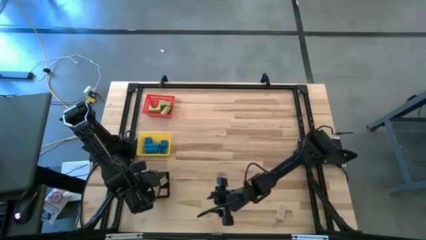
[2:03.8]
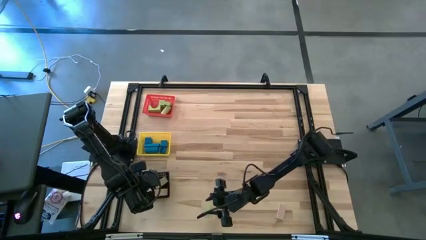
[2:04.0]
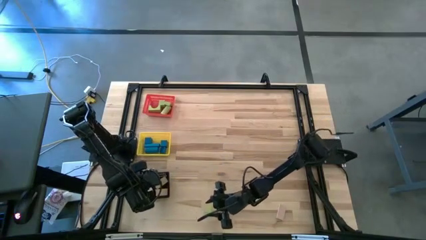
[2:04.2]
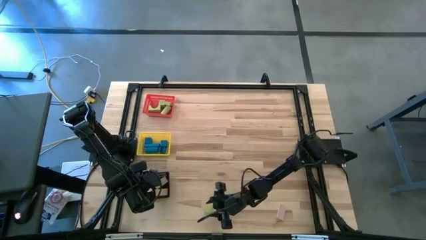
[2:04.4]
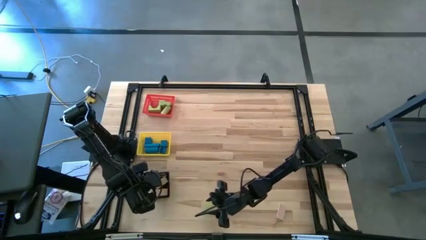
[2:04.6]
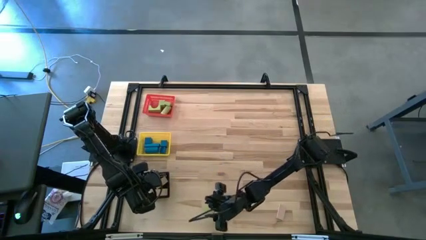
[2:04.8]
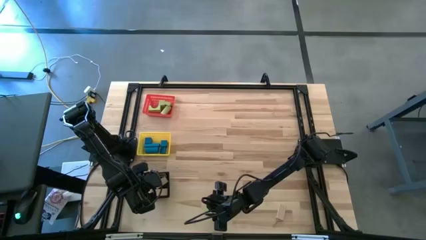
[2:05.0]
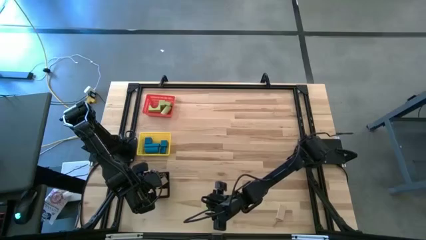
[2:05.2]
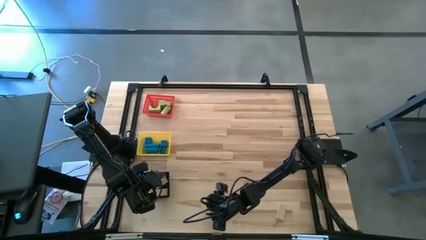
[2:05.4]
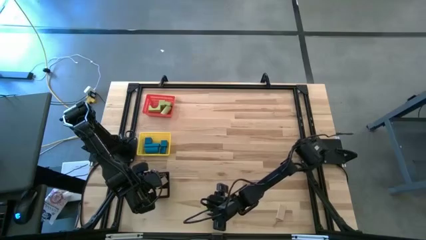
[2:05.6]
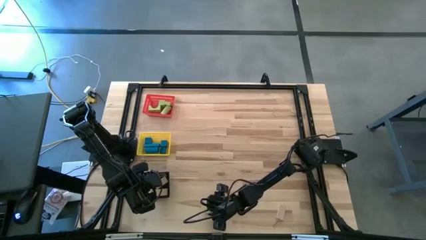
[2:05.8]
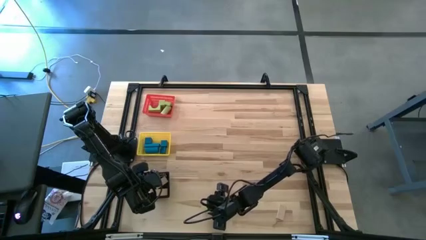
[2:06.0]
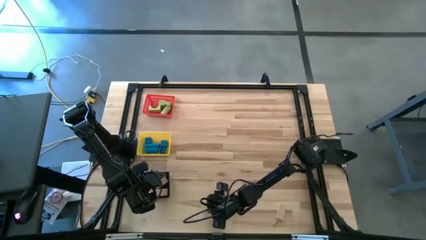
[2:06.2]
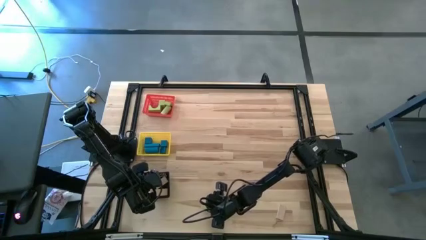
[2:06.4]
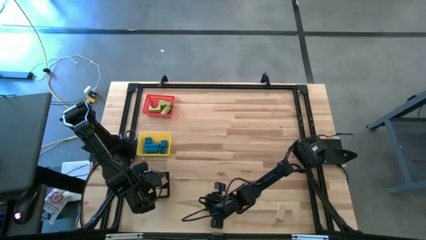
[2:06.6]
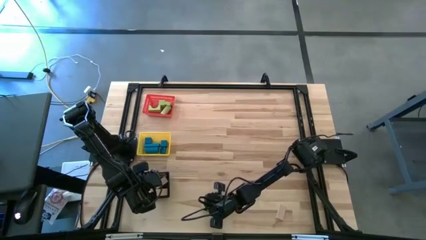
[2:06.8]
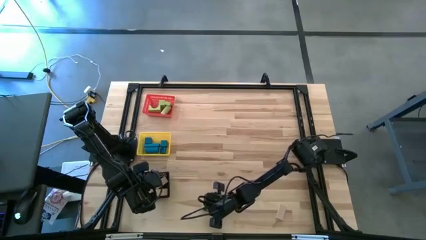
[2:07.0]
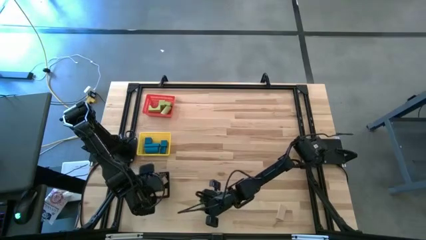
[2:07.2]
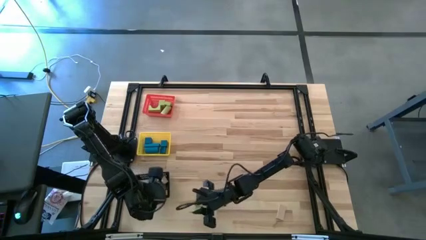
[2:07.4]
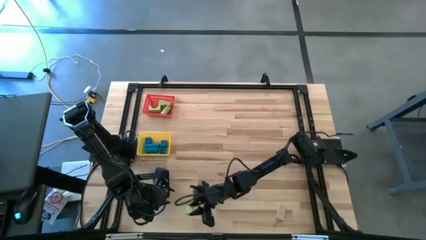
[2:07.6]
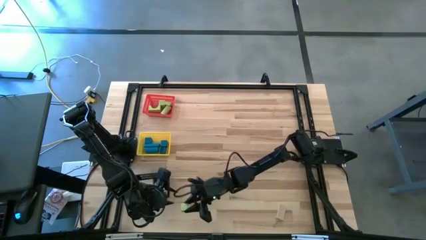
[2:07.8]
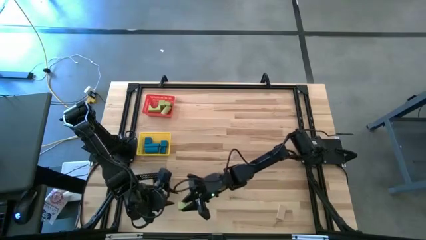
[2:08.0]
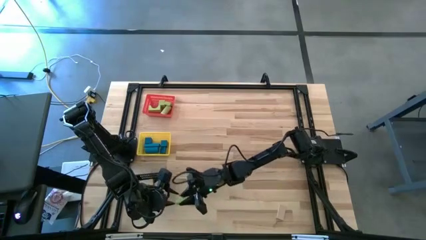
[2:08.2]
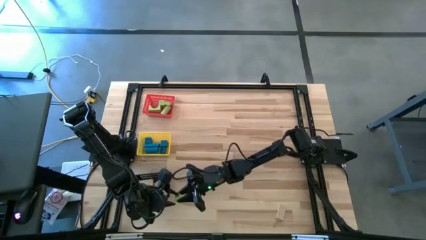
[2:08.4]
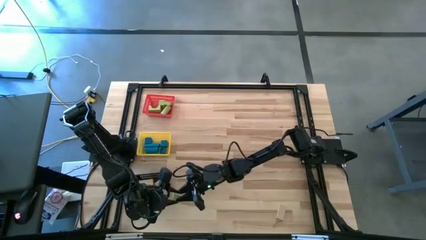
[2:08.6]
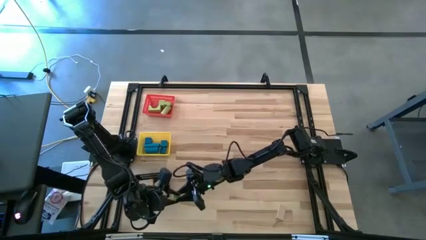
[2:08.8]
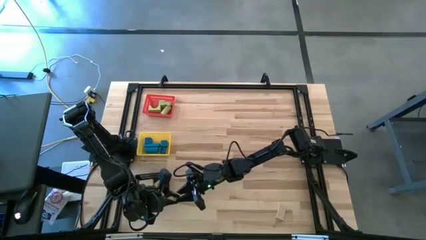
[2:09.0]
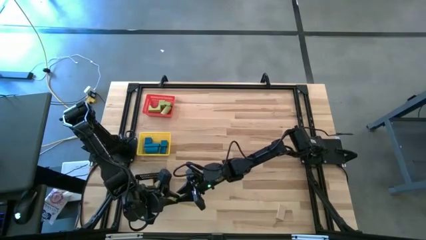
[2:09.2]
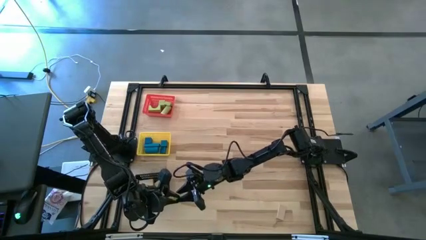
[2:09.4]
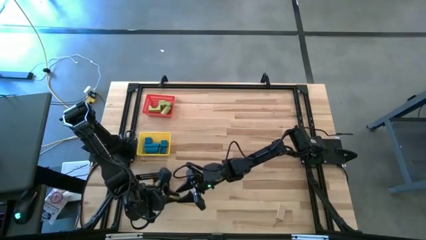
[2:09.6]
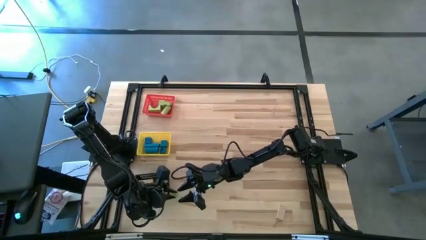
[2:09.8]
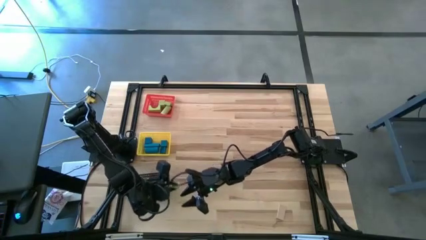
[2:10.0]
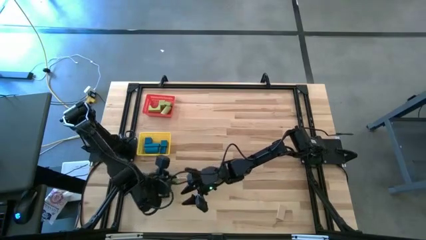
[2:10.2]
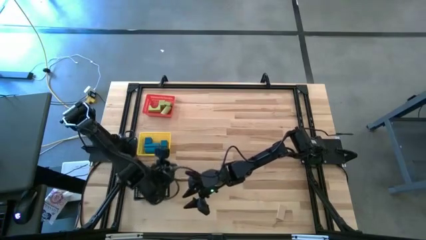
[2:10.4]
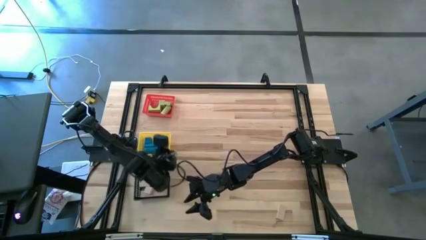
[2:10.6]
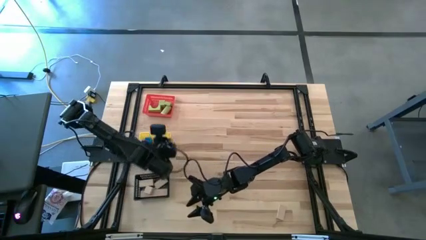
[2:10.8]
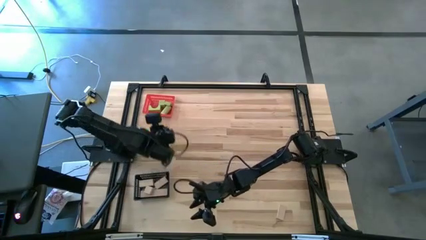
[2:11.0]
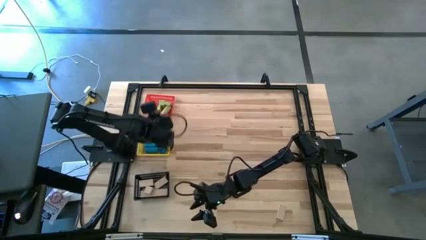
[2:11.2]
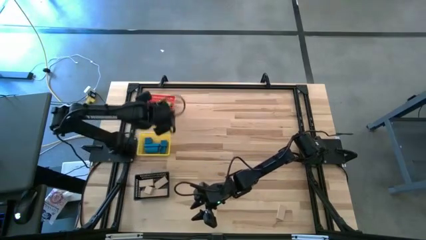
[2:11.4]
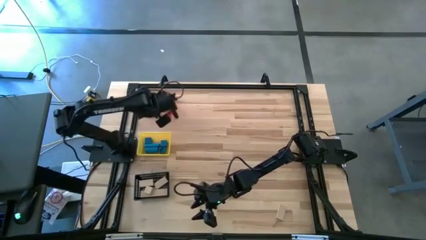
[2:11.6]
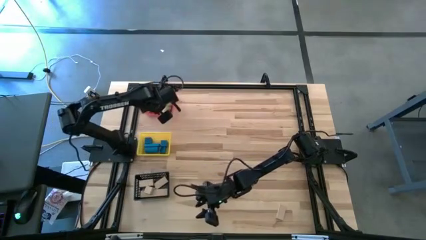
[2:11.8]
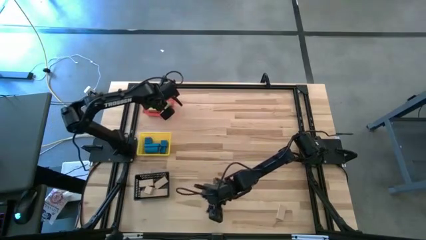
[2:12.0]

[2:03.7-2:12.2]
Task: Sort & place blocks by color
Put the square green block into the red basket

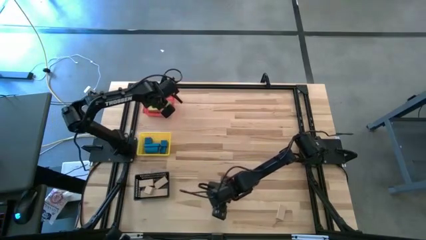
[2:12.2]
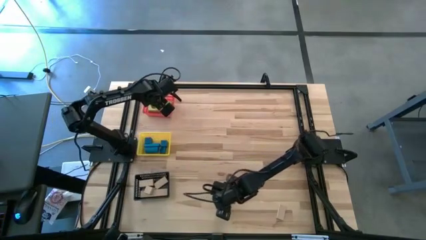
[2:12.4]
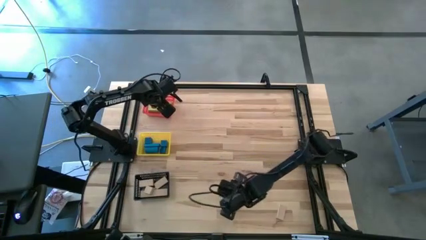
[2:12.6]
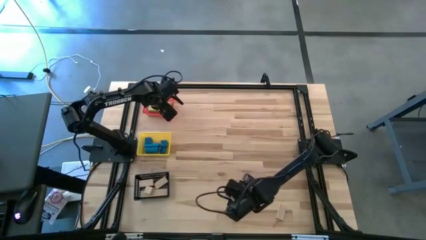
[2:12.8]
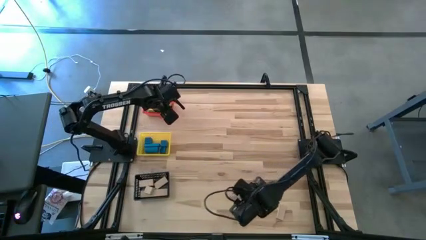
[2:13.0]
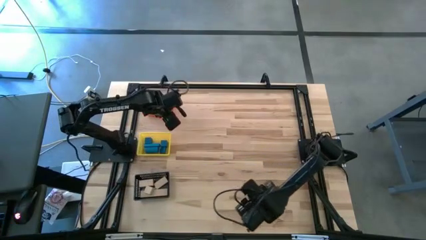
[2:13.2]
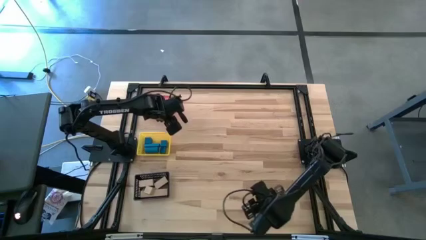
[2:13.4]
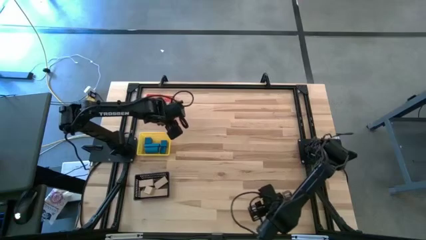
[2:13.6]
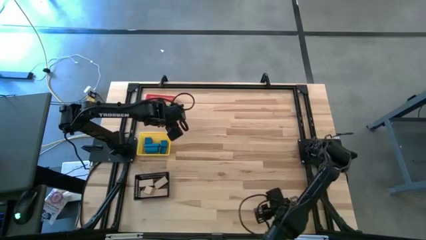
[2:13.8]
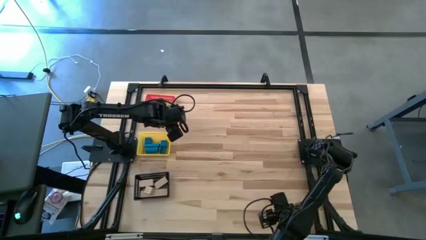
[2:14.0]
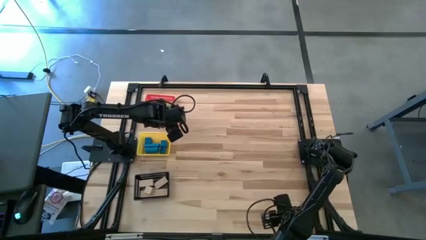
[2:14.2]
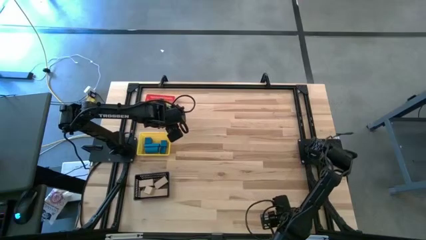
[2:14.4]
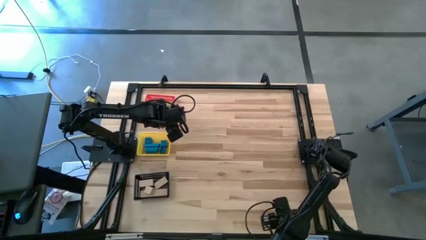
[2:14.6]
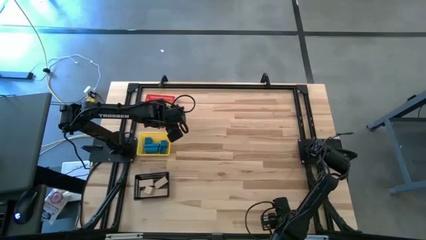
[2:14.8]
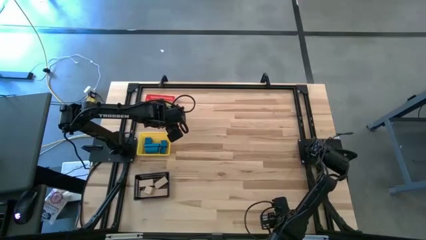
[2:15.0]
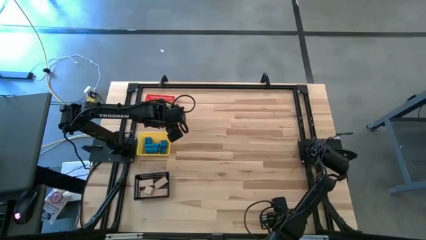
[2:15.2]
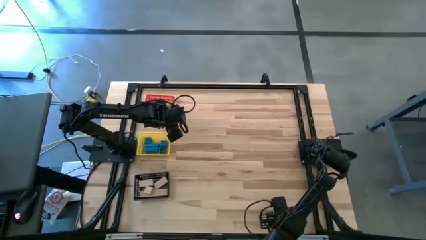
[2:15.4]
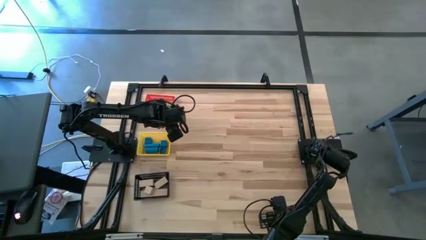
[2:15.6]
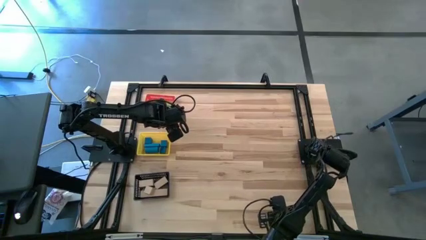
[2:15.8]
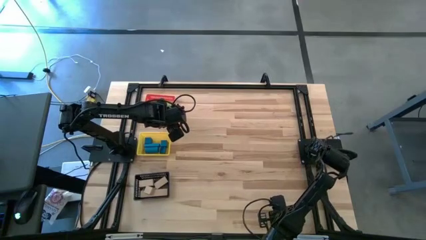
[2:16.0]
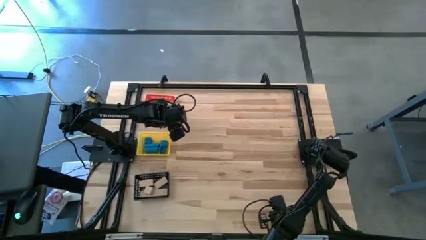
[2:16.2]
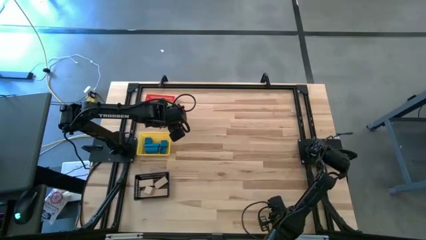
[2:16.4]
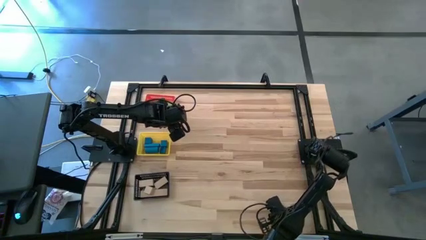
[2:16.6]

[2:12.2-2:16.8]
Put the rectangular wooden block into the black basket

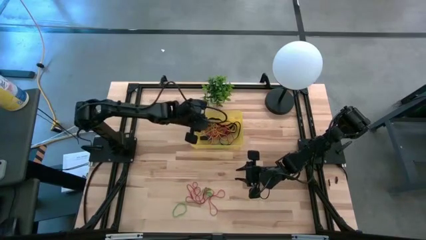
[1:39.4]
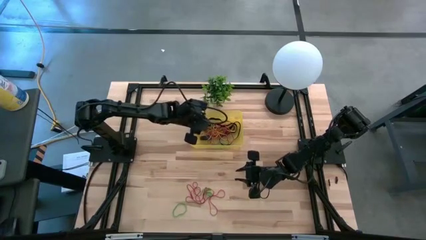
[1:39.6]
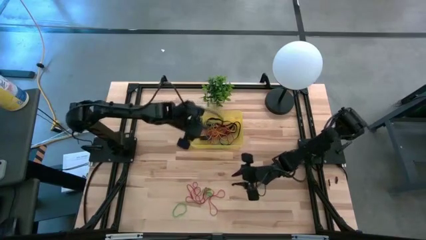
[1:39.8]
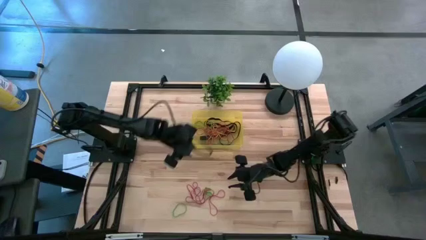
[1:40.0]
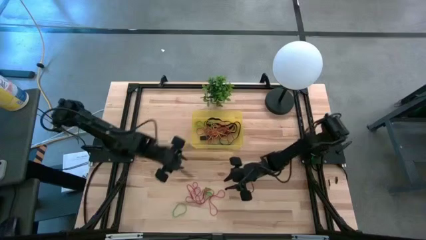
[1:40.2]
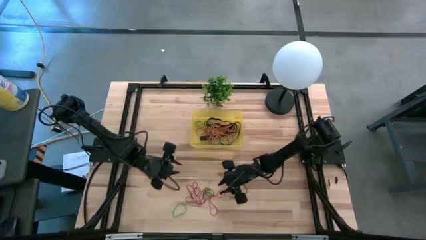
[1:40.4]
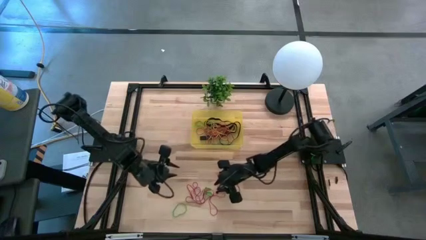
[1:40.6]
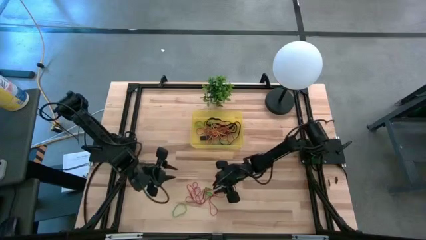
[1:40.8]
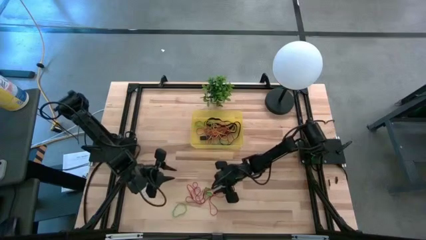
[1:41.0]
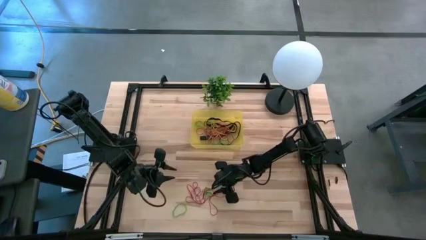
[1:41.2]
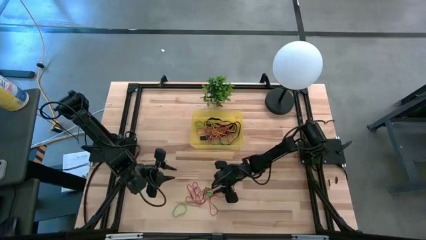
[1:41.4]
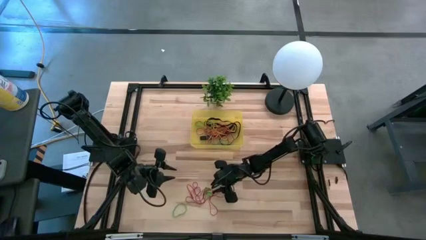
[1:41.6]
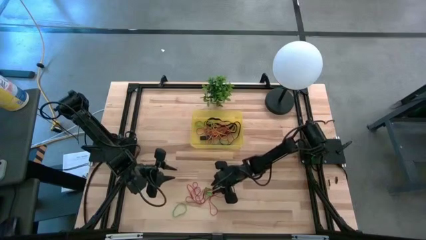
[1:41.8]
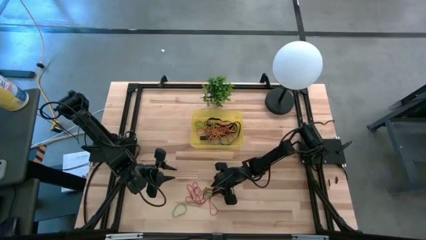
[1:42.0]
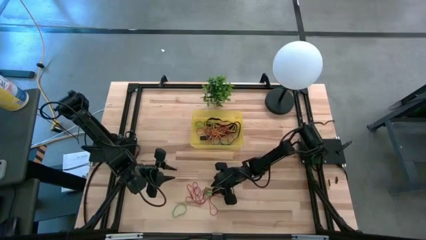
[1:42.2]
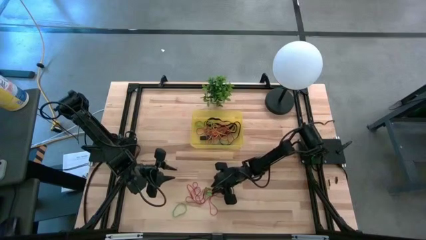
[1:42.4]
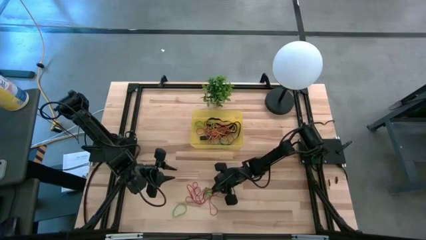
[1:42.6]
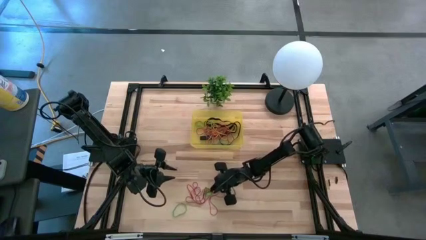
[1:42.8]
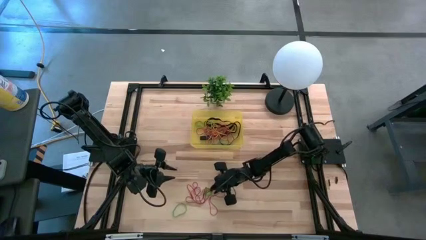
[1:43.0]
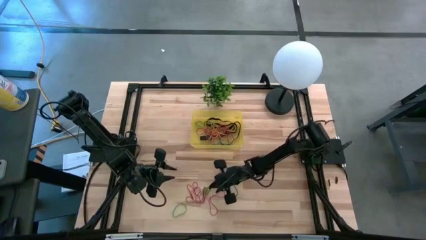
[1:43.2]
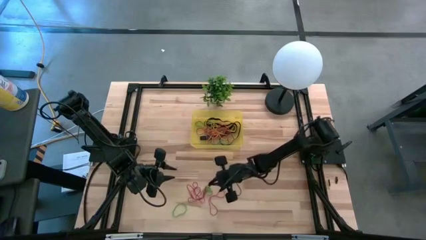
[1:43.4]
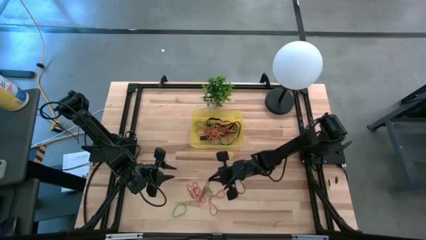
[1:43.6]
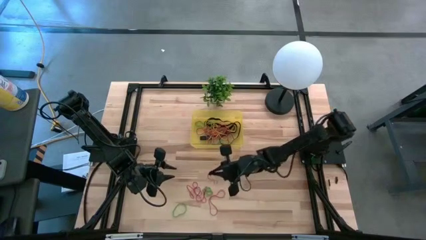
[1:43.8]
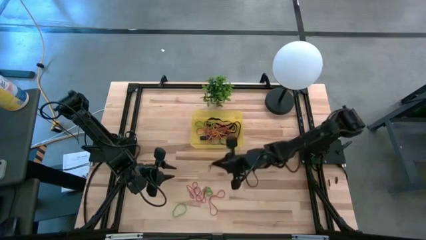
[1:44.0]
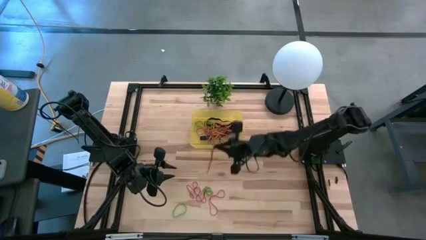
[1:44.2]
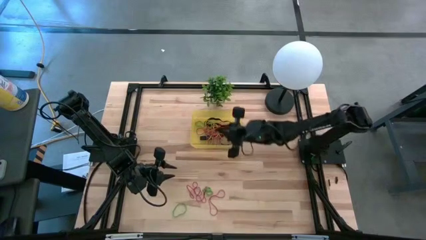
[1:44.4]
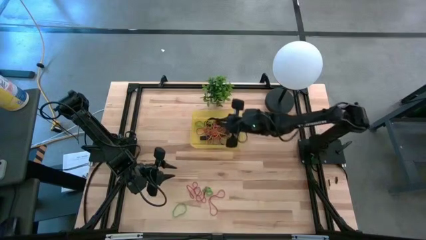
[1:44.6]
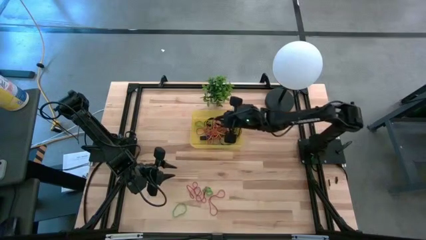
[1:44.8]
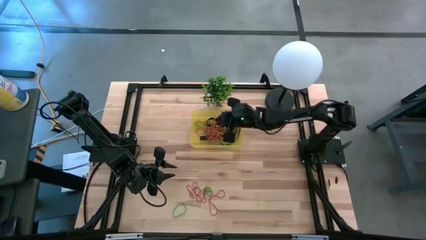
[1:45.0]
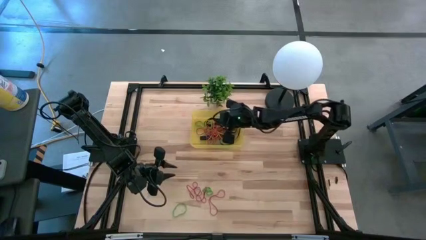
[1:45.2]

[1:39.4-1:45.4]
Task: Pick and place rubber bands into bin
Put the red rubber band into the yellow bin
